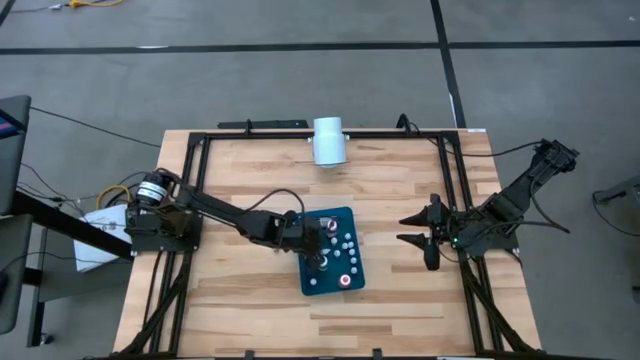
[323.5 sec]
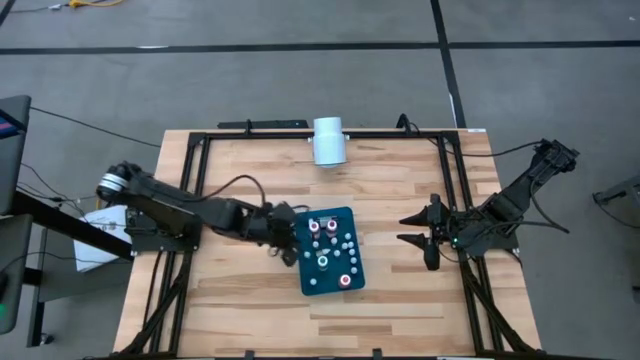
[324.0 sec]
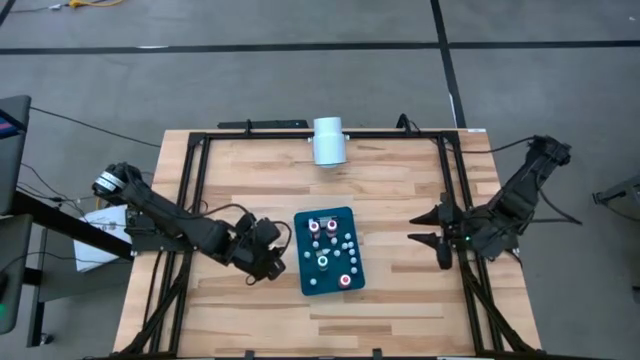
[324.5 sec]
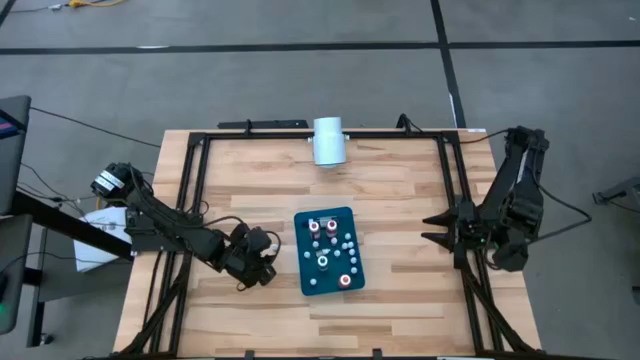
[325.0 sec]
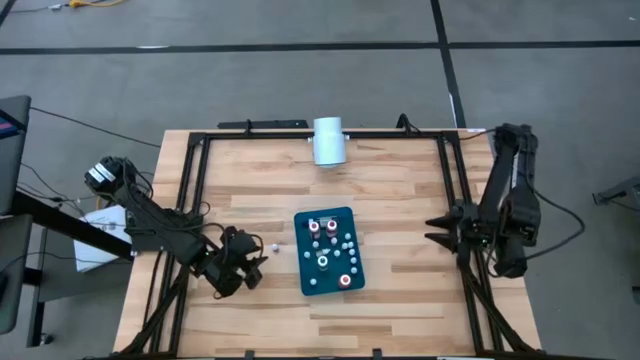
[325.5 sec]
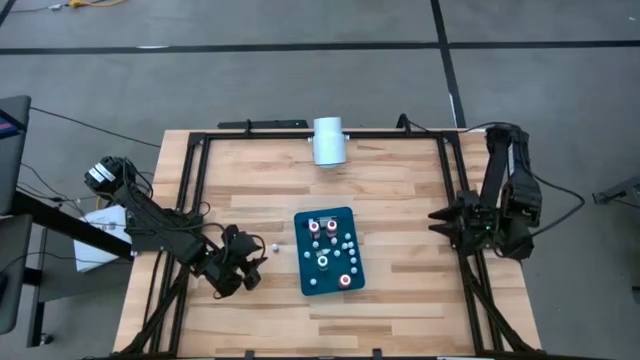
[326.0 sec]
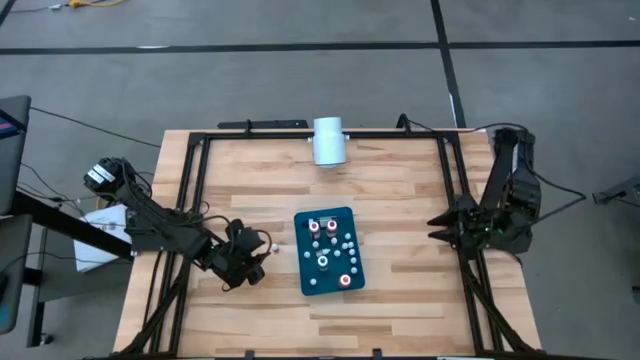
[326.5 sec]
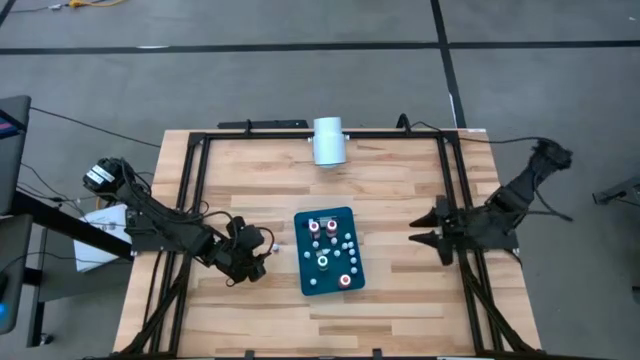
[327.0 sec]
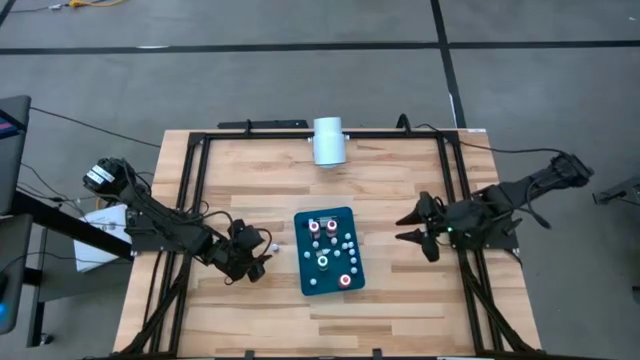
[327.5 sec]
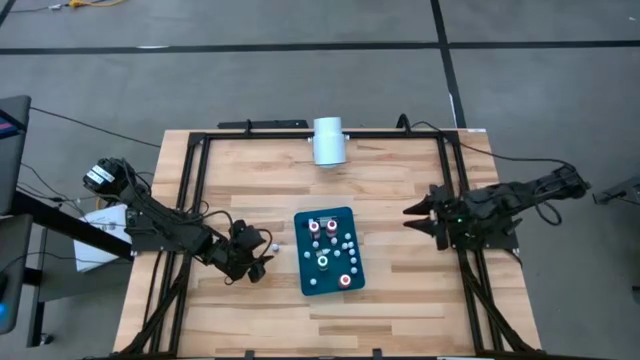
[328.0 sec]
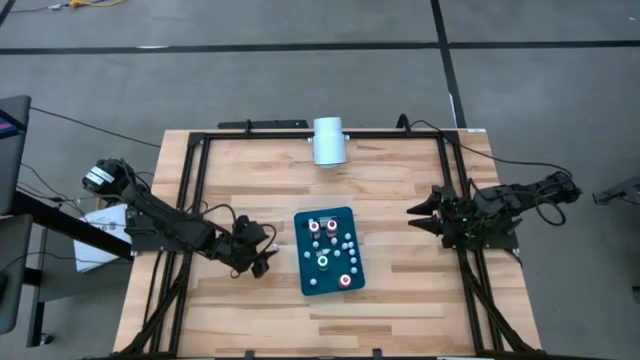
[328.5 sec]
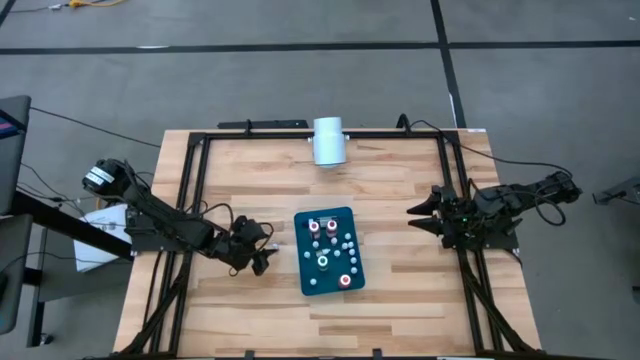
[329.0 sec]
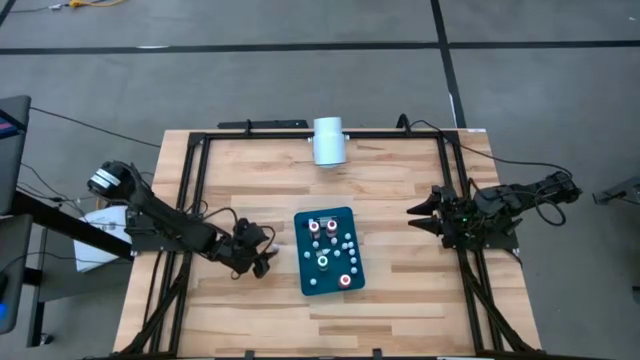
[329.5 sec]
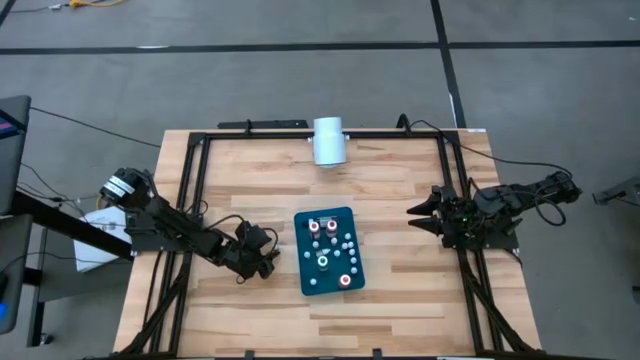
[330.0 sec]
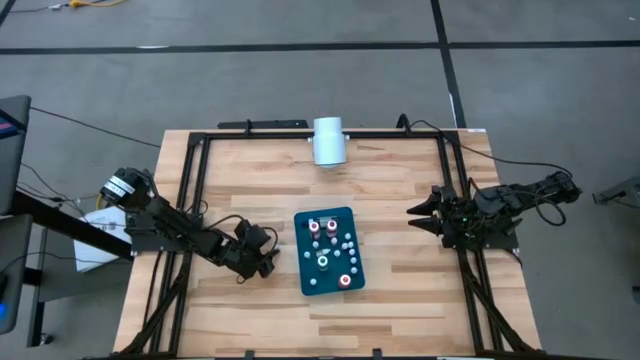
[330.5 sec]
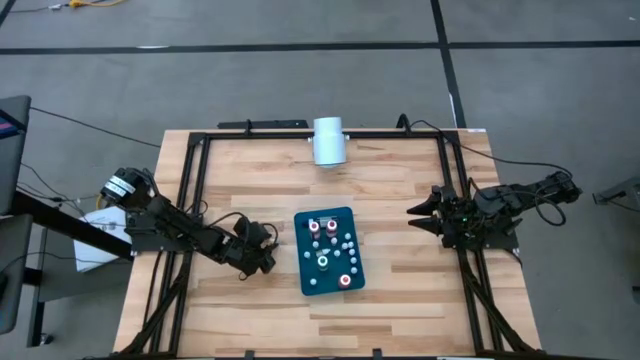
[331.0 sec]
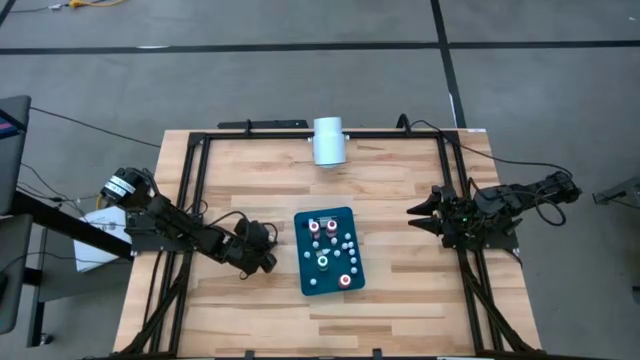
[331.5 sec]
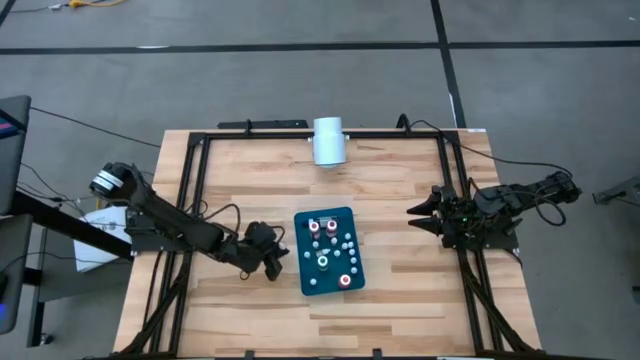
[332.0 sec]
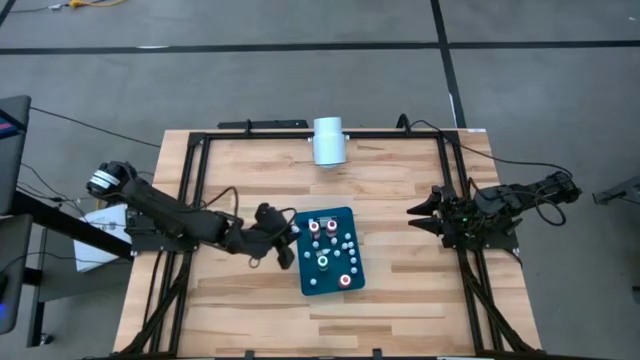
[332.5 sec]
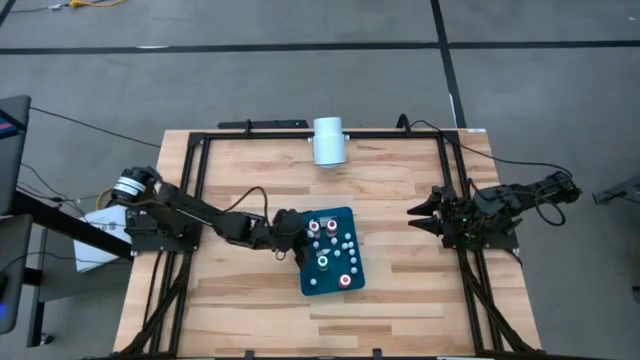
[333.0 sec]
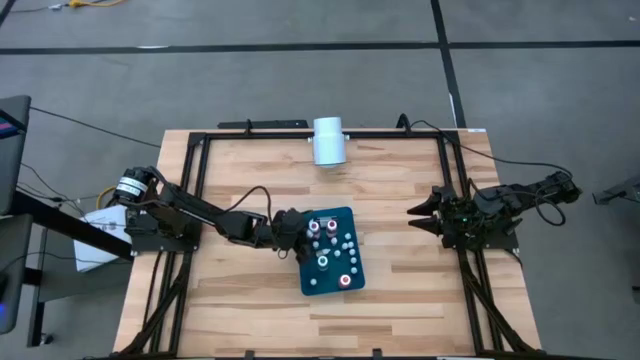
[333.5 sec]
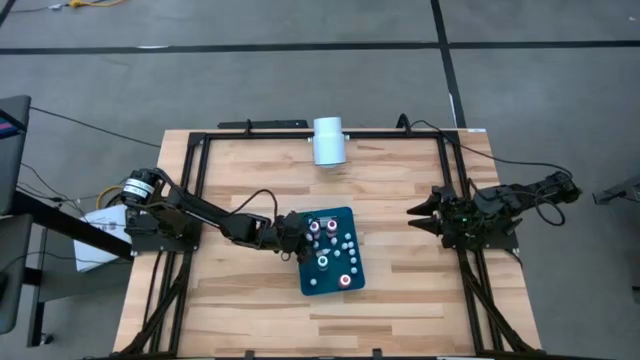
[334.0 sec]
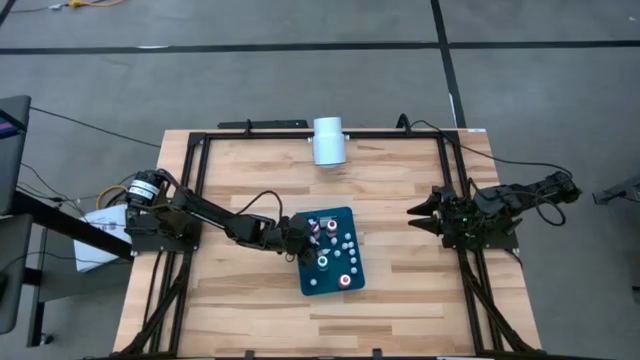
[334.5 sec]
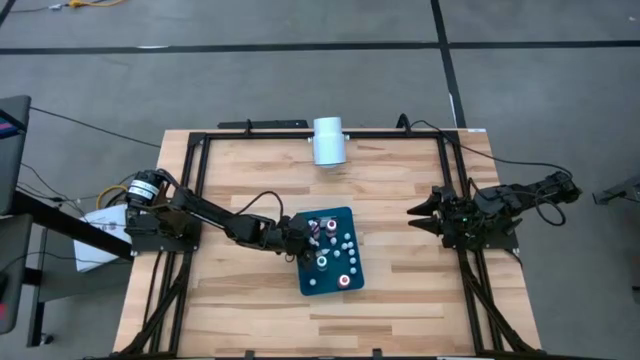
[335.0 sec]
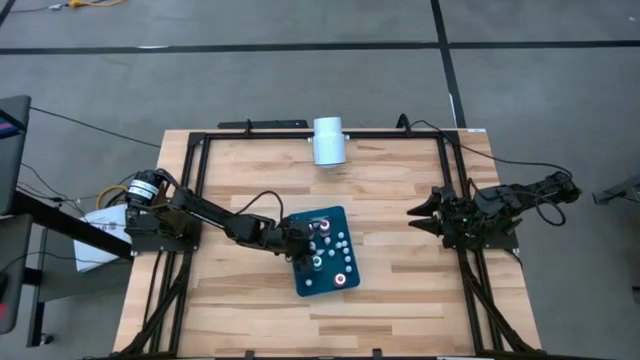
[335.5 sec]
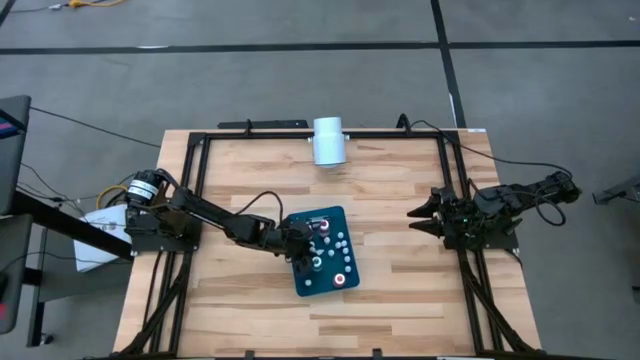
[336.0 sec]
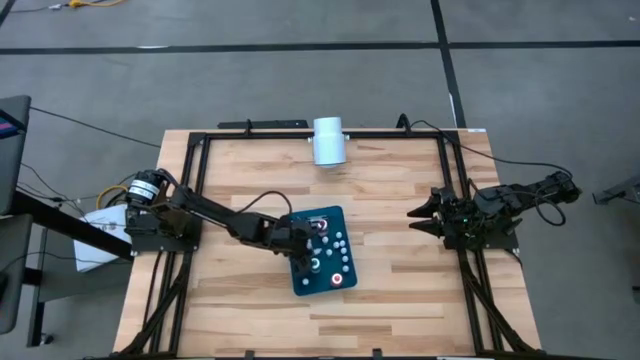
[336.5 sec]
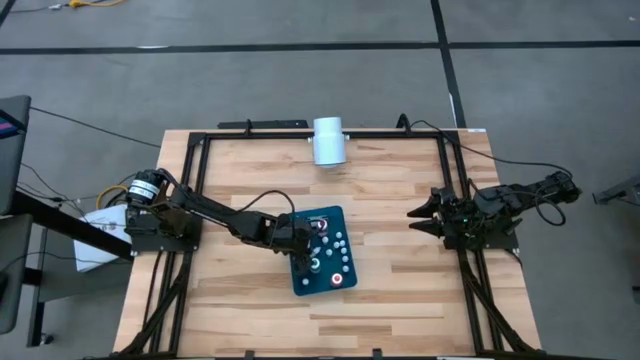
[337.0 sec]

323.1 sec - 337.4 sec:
Task: Pick & Place food coloring
Put the small purple food coloring bottle into the blue bin

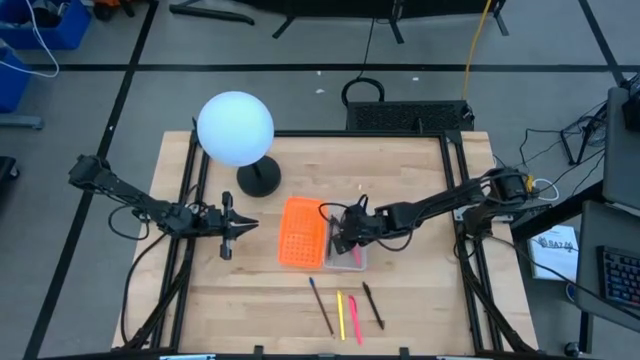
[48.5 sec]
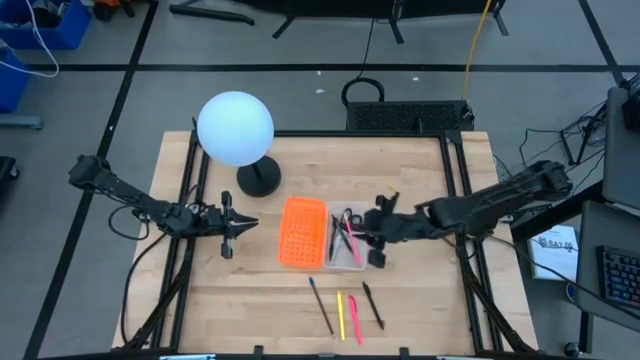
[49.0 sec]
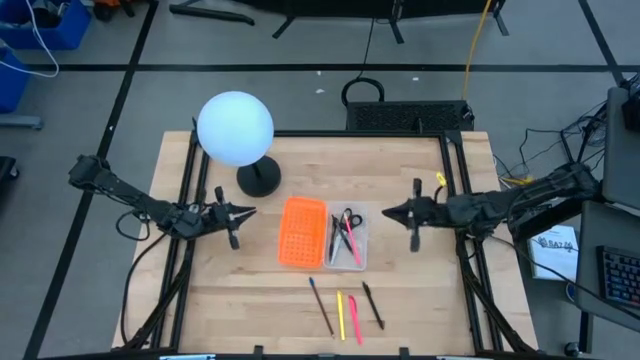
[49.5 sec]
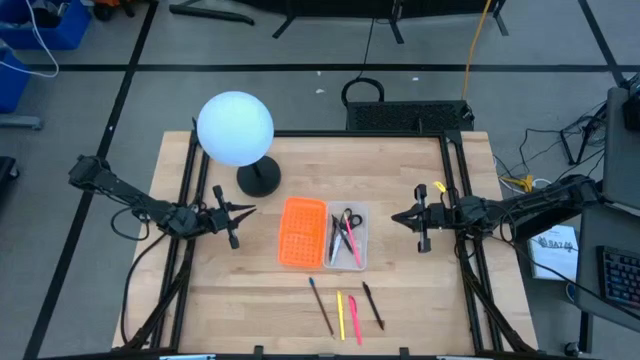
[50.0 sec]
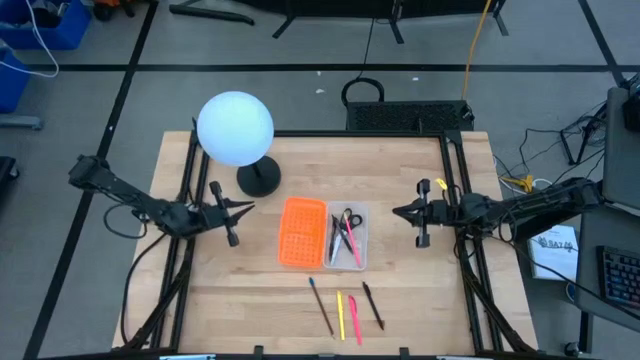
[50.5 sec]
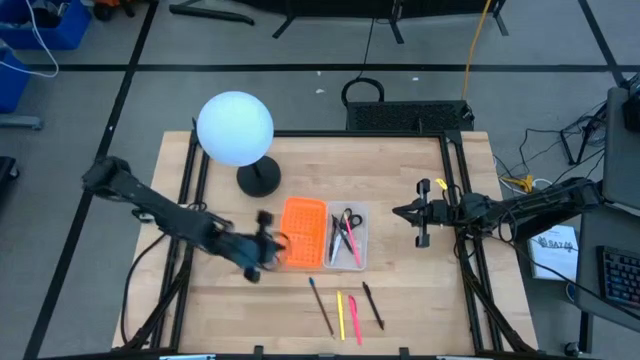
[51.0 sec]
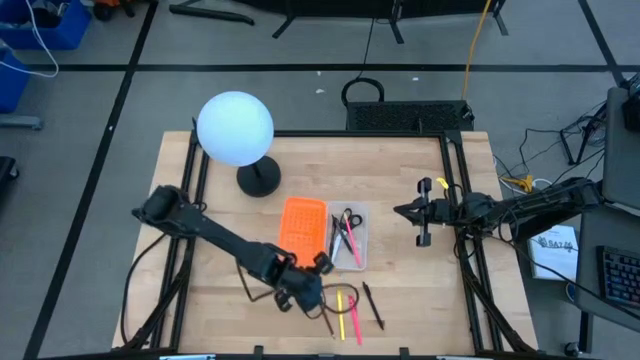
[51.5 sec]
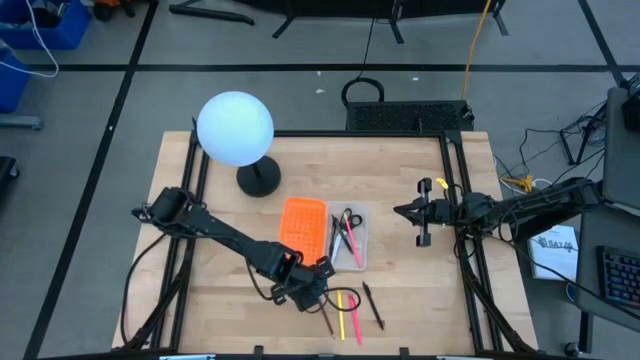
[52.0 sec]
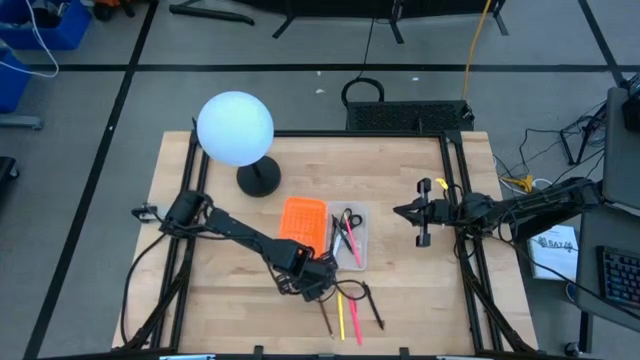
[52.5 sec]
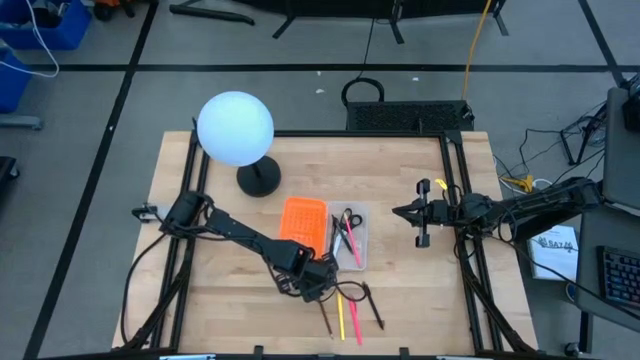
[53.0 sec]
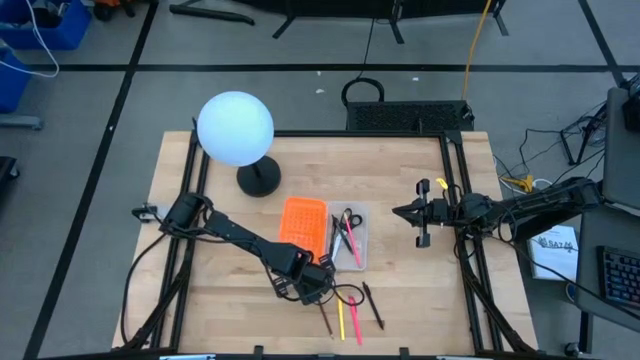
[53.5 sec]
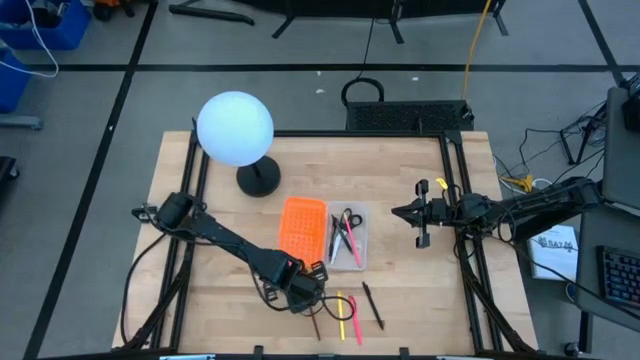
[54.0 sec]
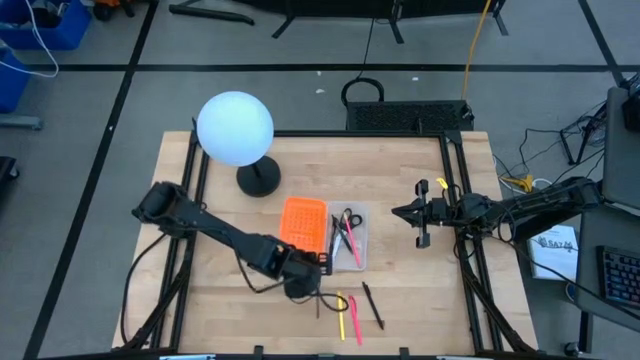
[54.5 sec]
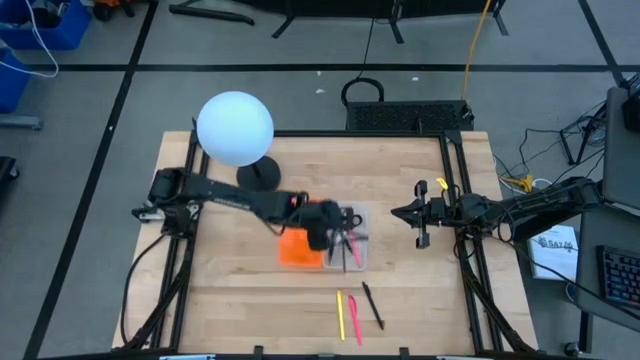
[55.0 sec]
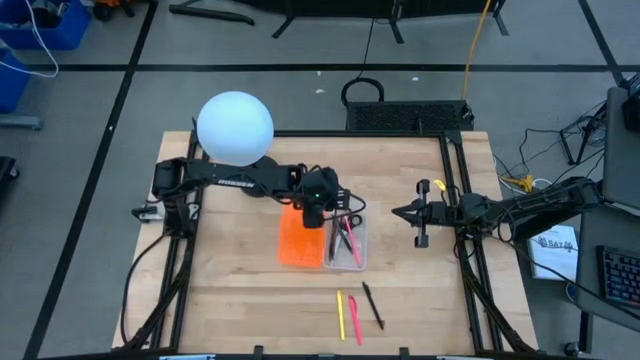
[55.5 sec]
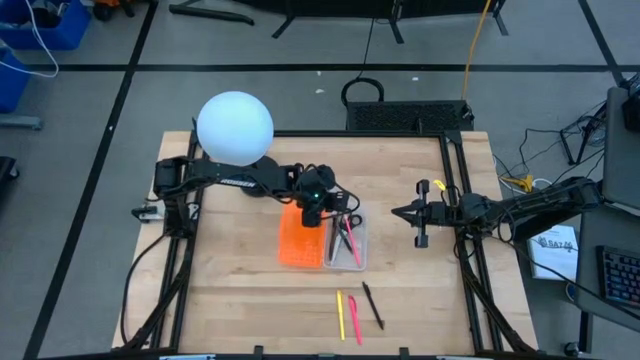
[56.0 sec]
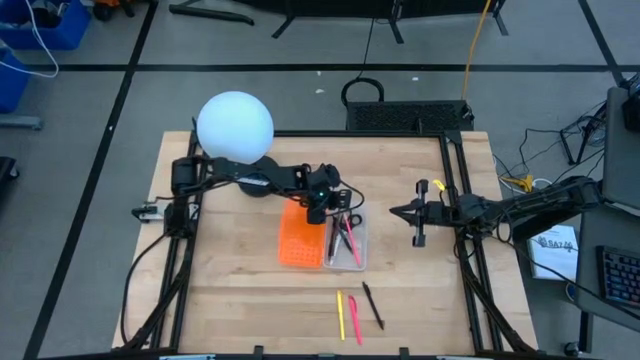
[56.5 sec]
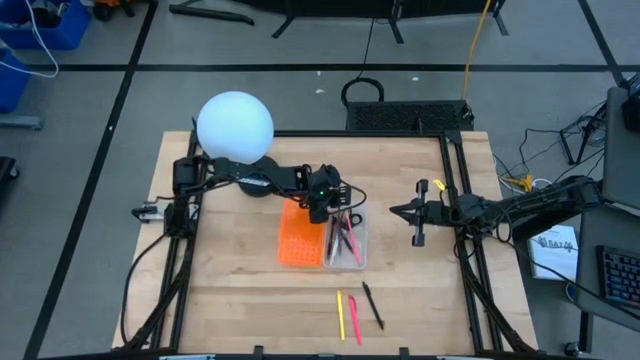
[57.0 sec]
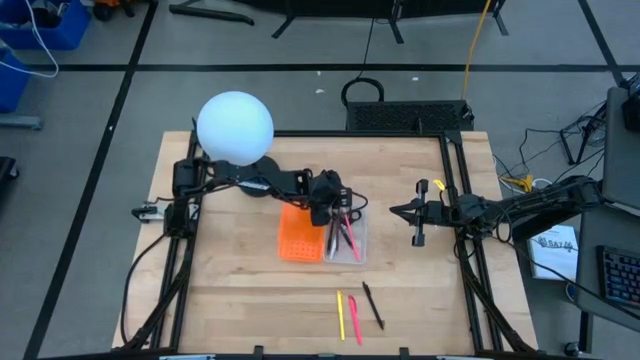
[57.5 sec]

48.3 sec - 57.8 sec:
Task: Pick & place school supplies into a supply box
Put the brown pencil into the orange supply box
